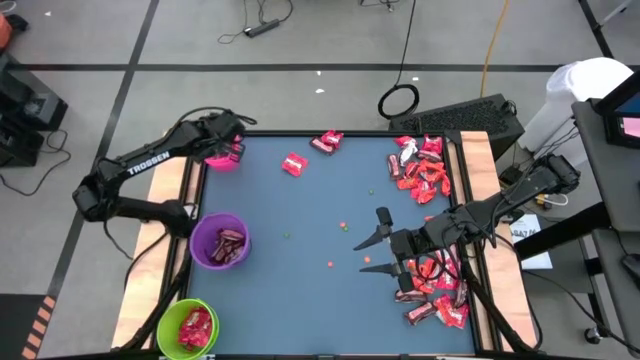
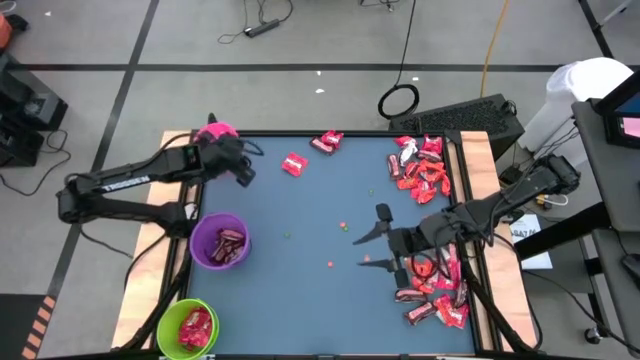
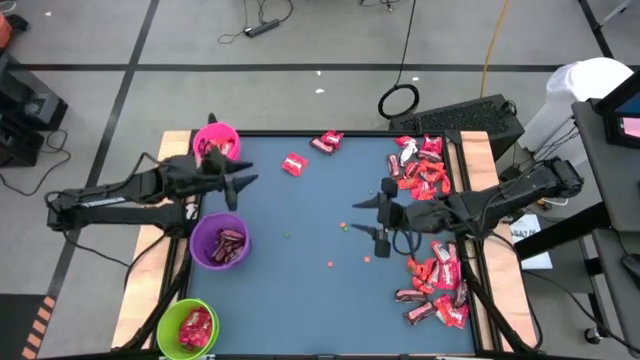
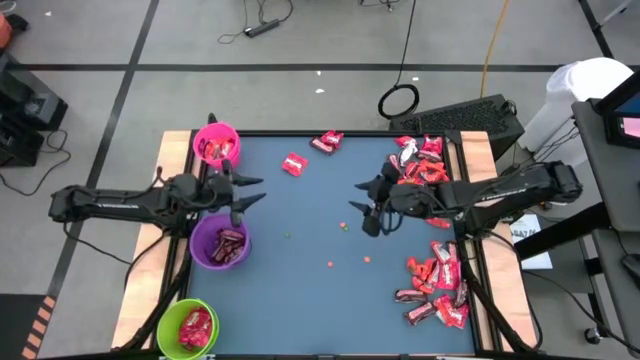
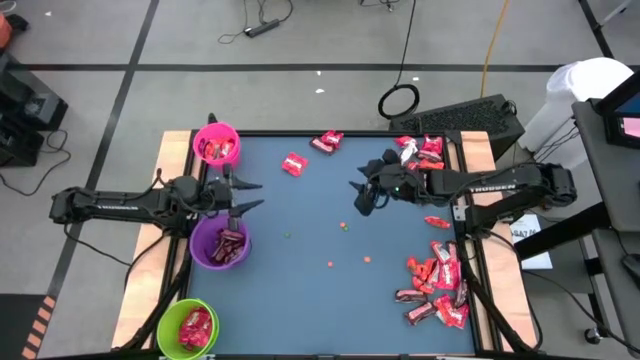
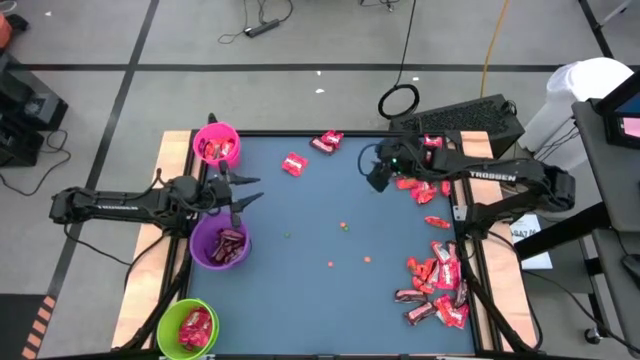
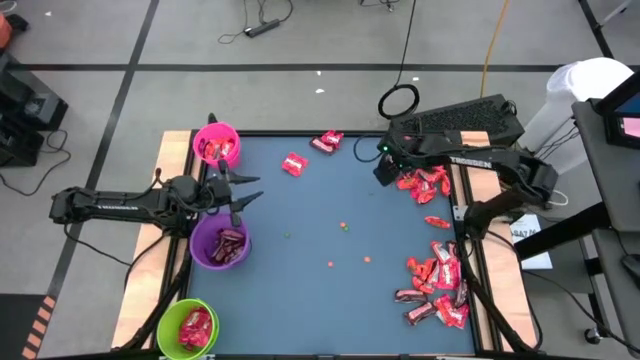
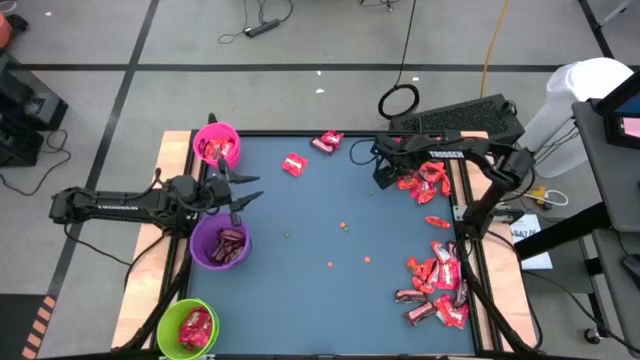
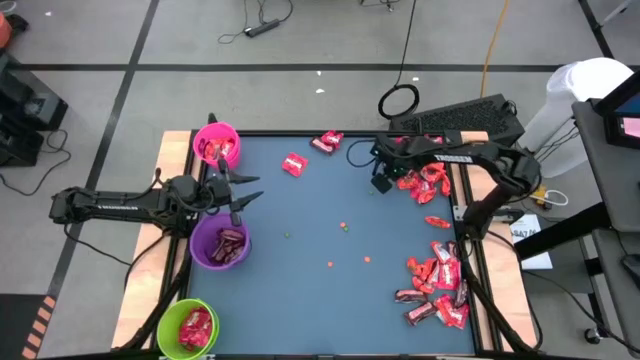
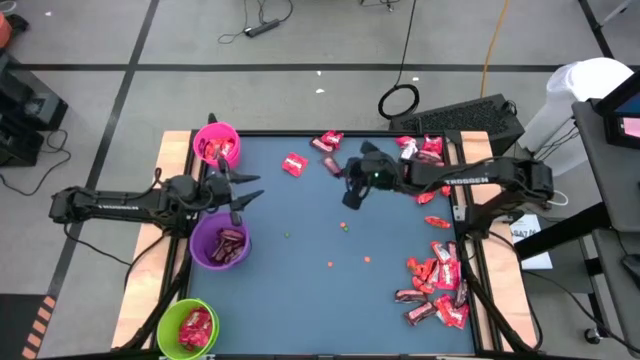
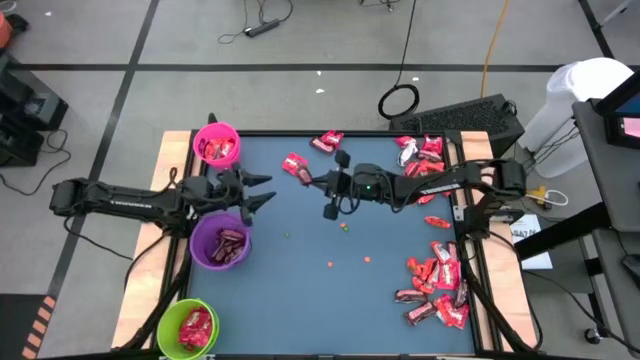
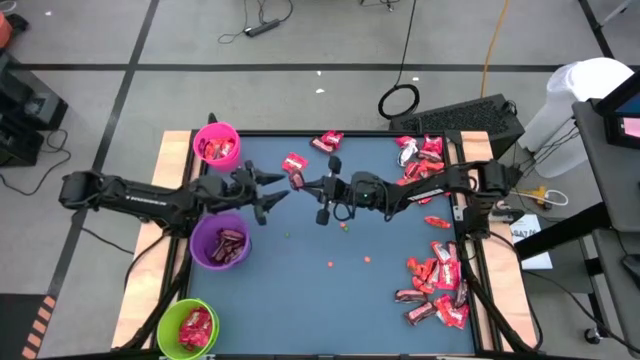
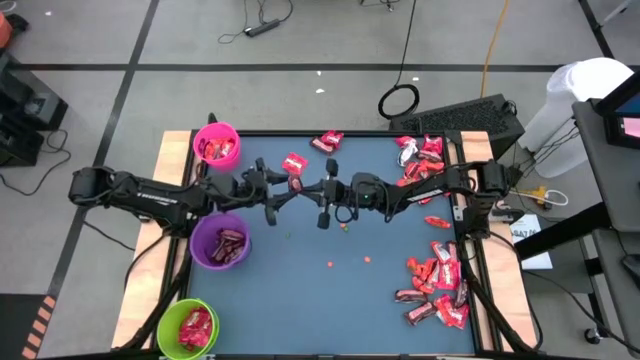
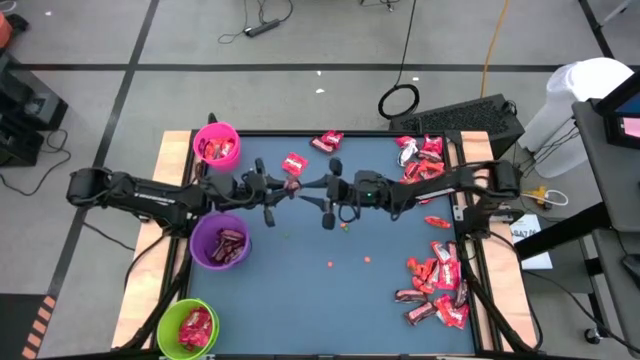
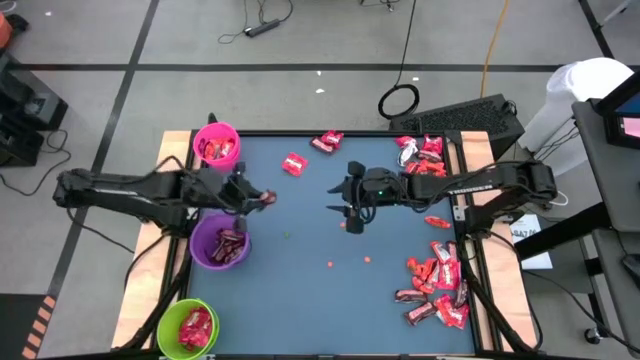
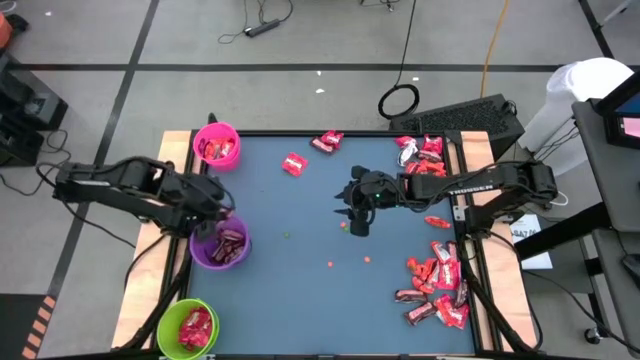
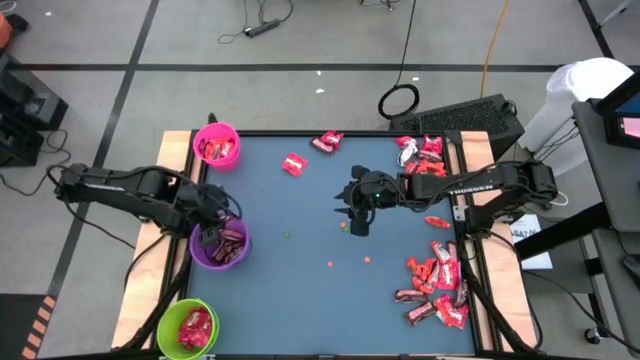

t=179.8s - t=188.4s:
Task: Organize candy in baskets
Put the brown chocolate into the violet bucket

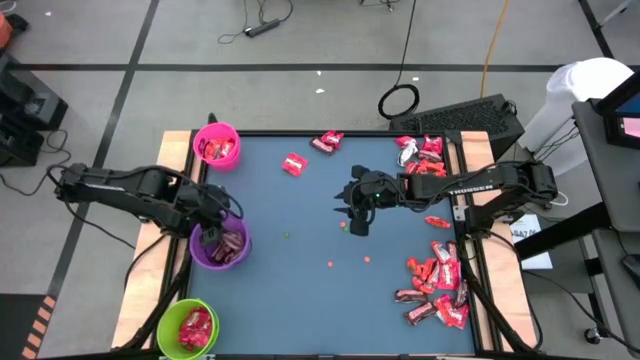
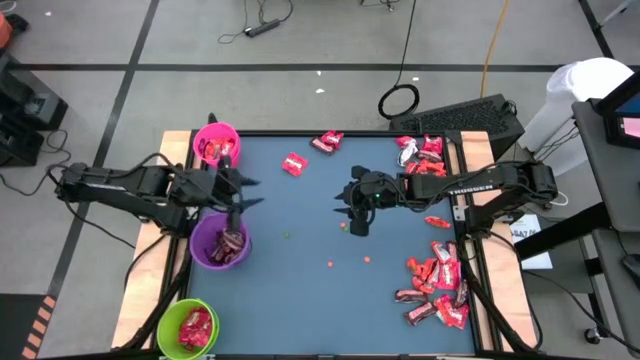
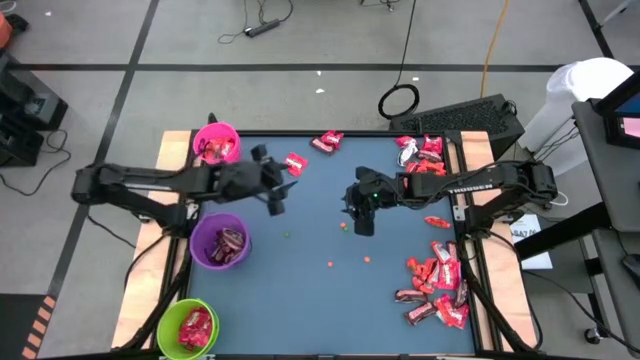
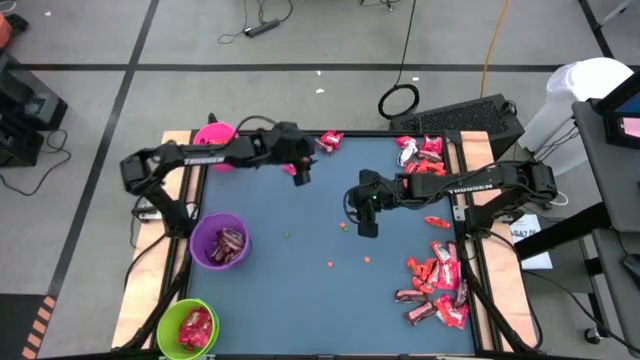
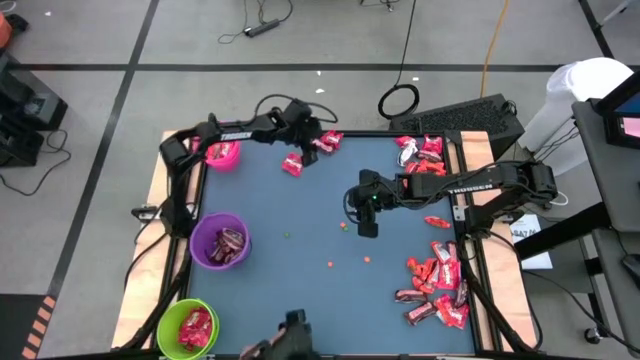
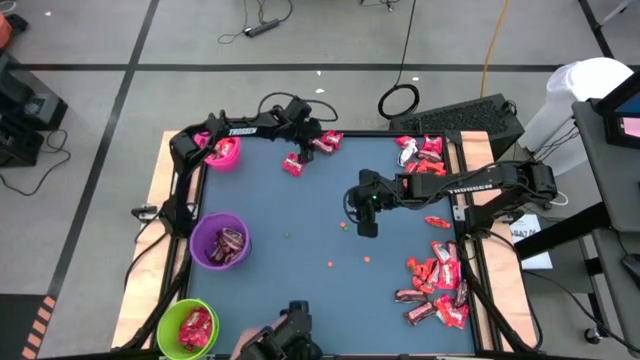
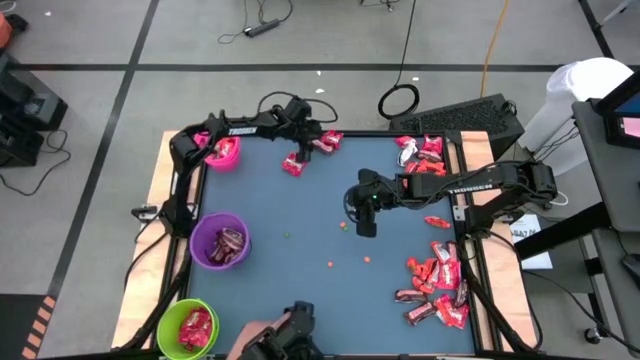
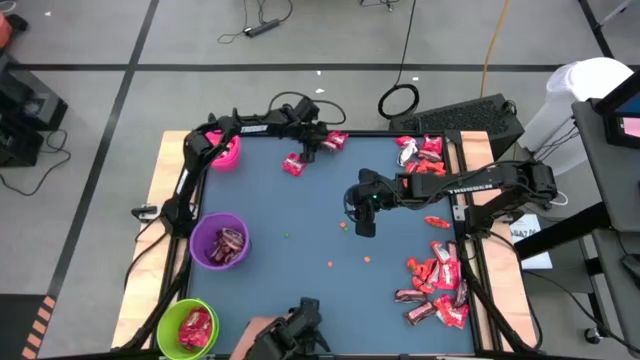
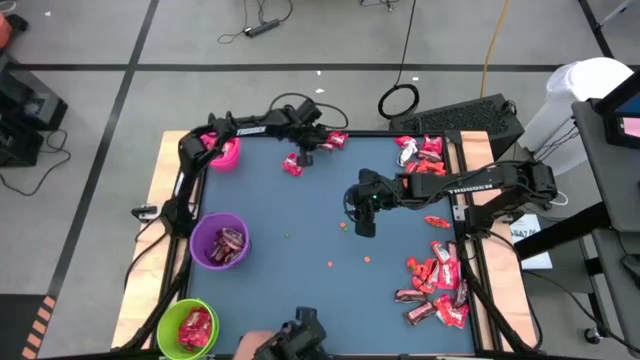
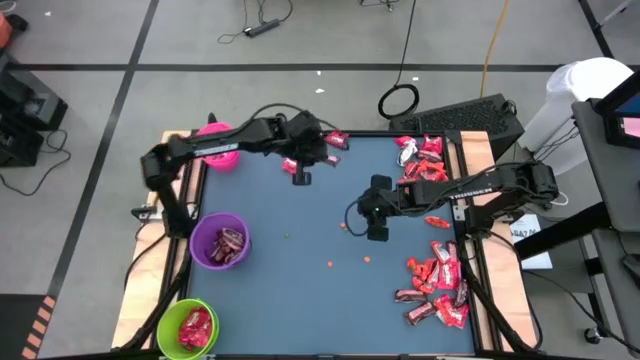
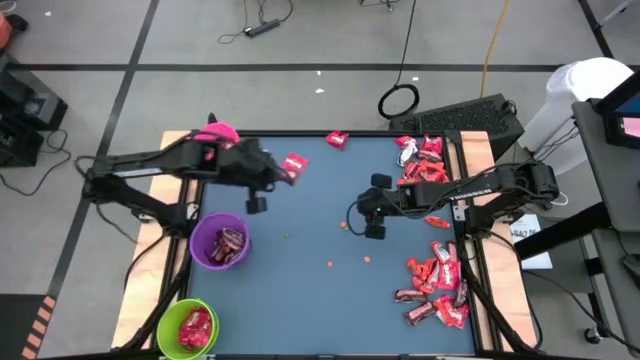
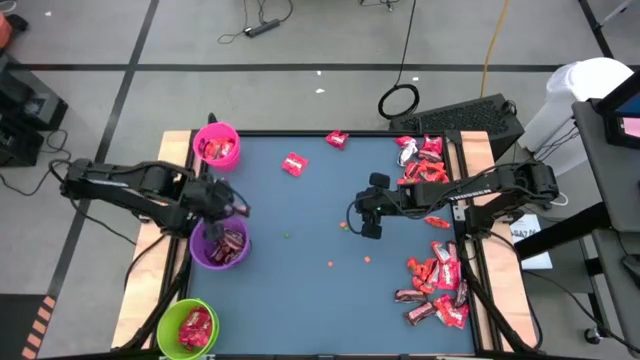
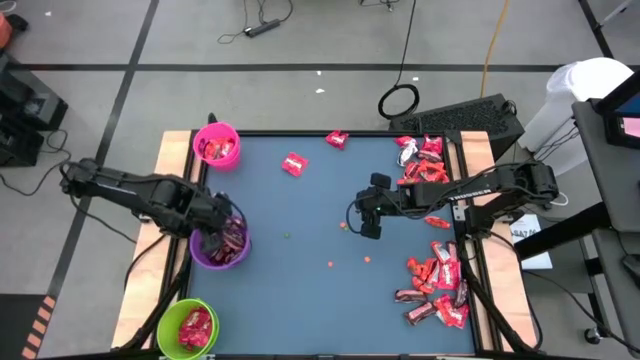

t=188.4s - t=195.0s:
Put the brown chocolate into the violet bucket

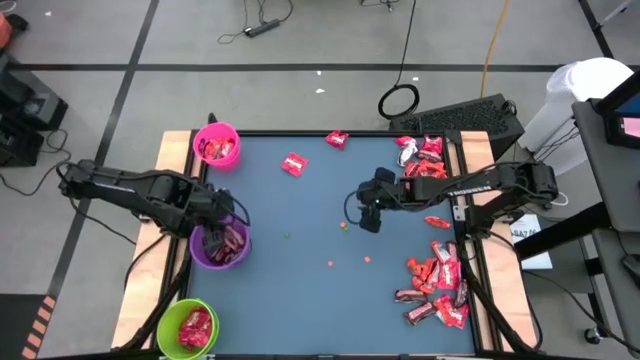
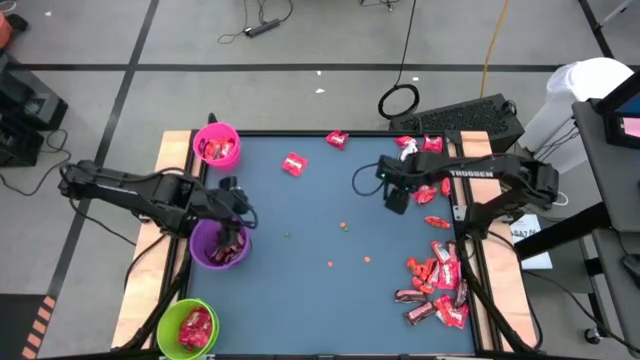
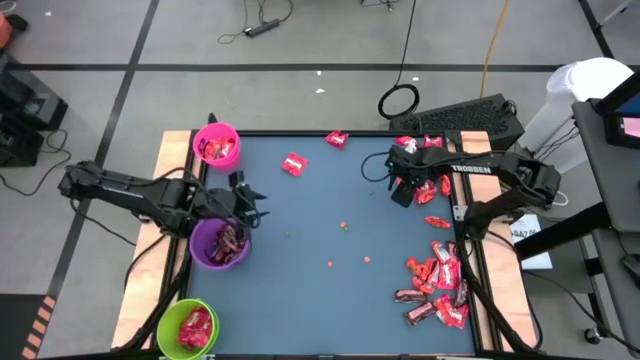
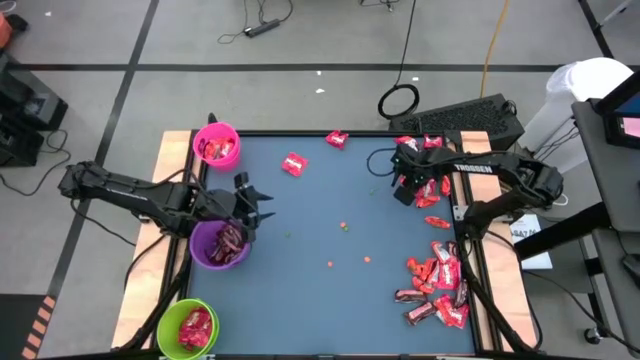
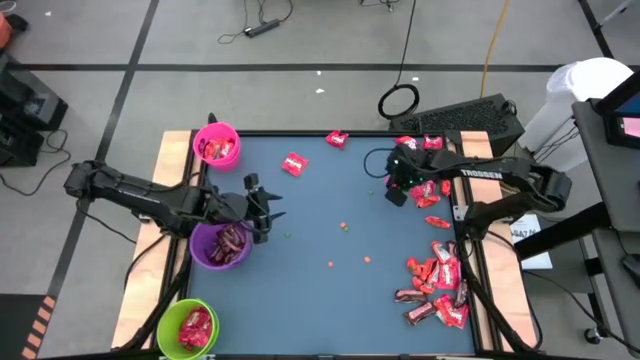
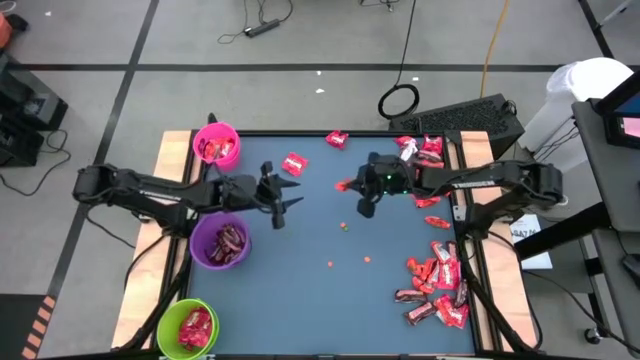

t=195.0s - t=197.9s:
Put the orange chocolate into the pink bucket

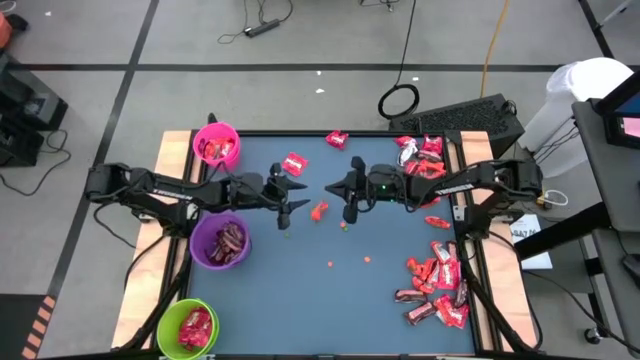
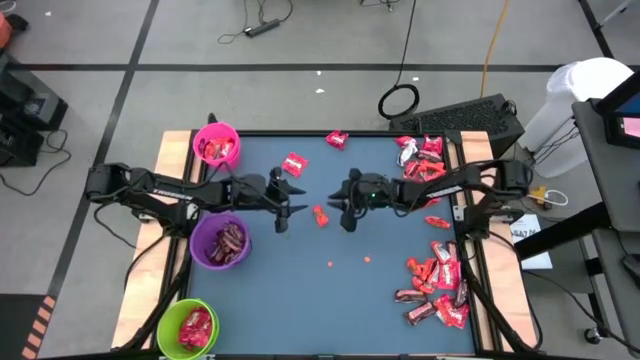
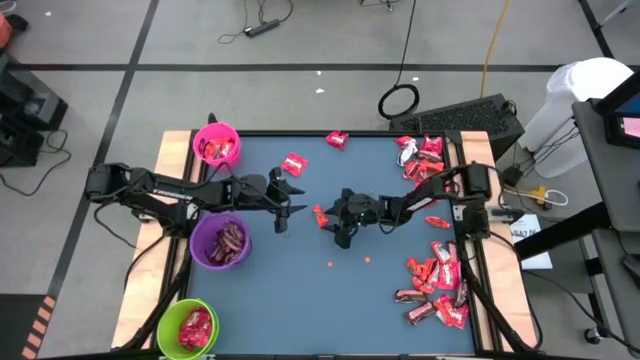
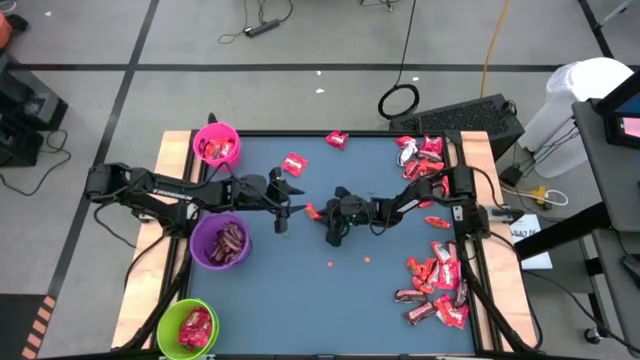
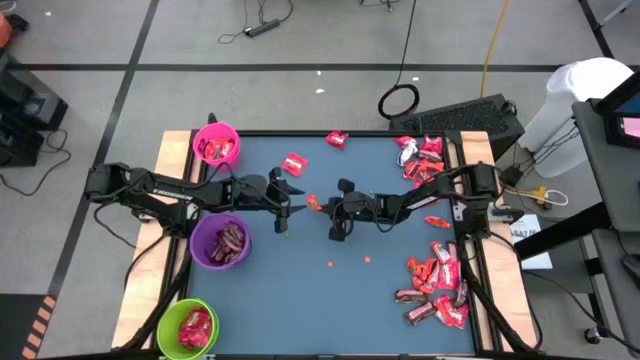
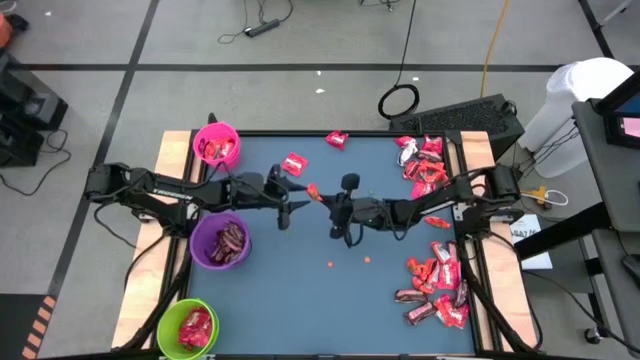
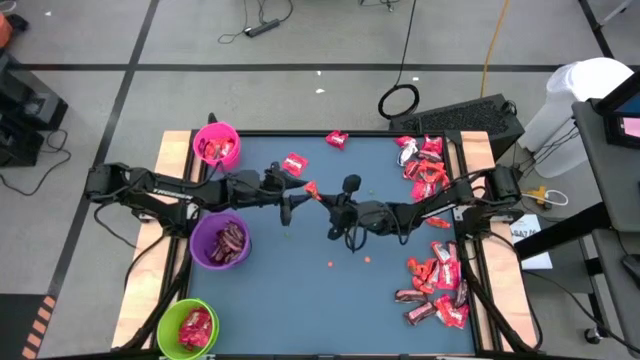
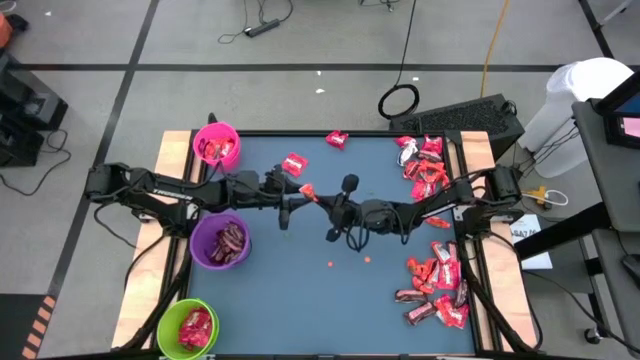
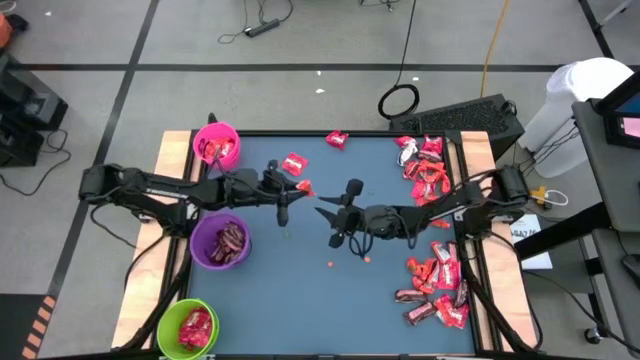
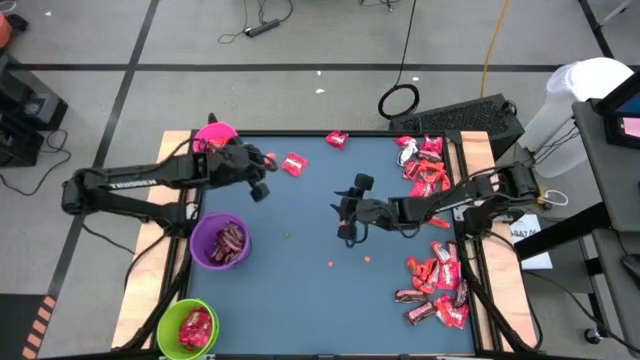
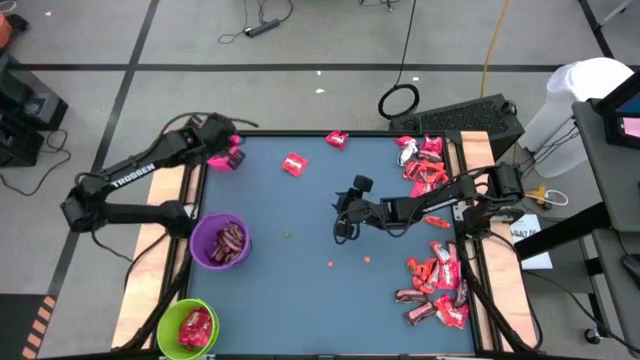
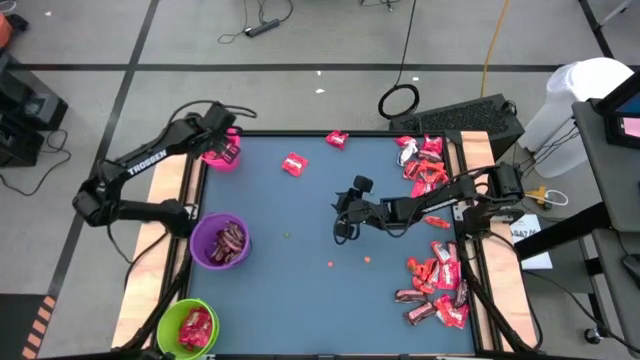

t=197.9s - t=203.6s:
Put the orange chocolate into the pink bucket
